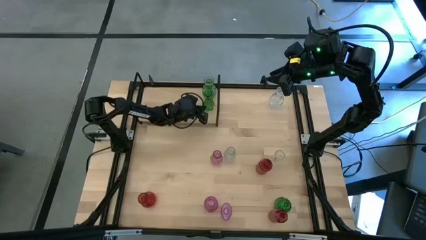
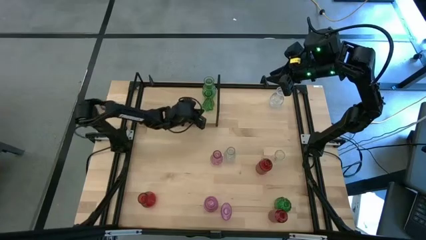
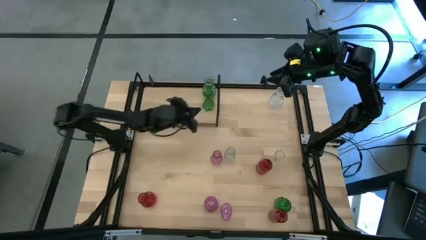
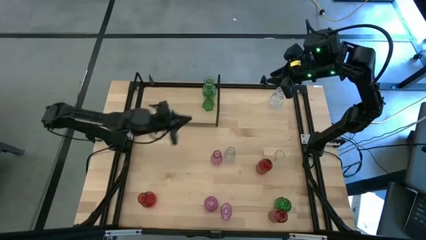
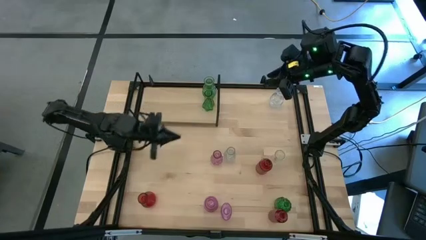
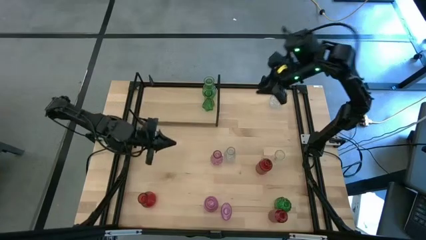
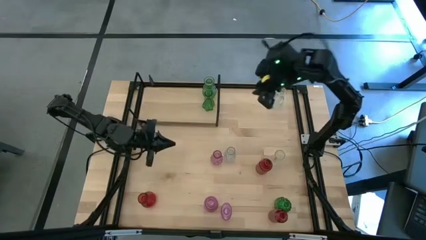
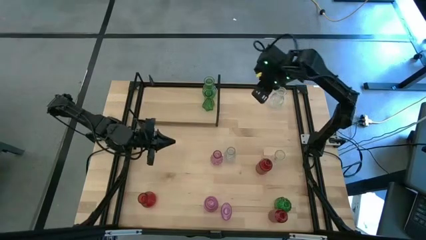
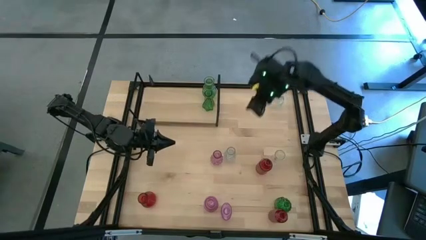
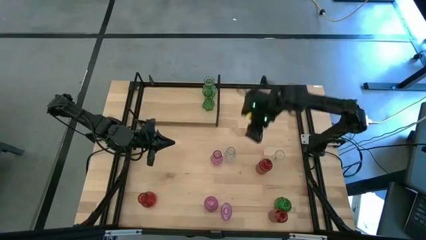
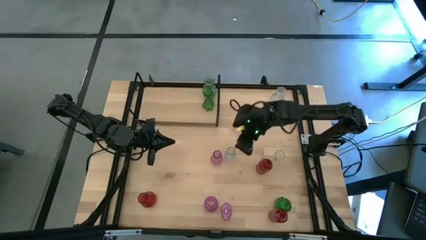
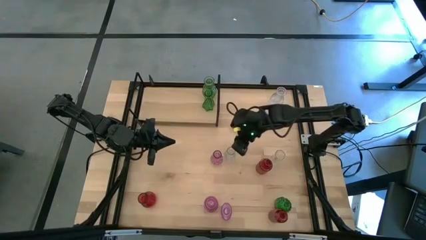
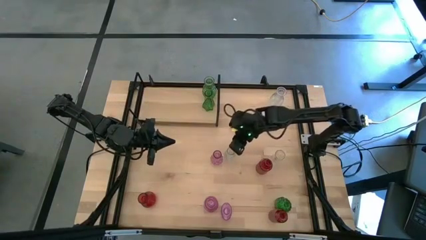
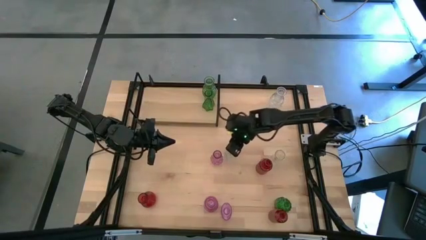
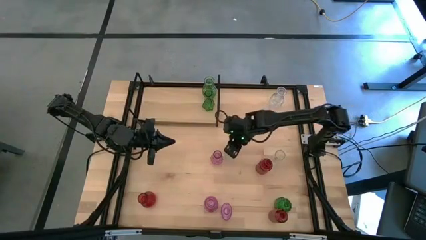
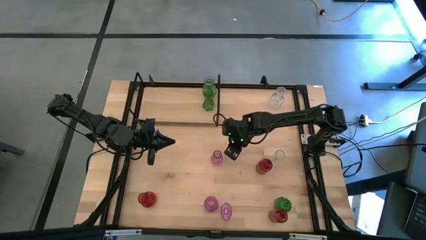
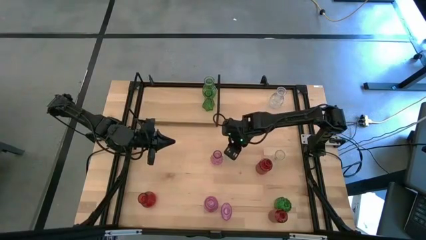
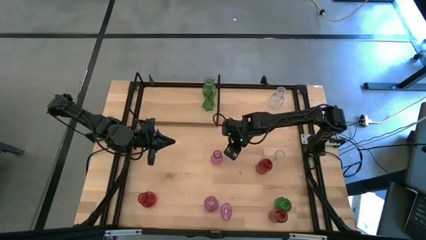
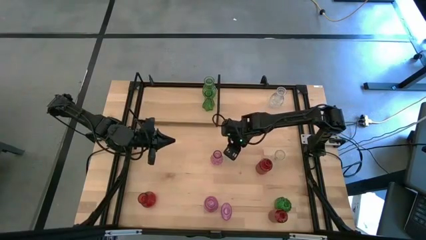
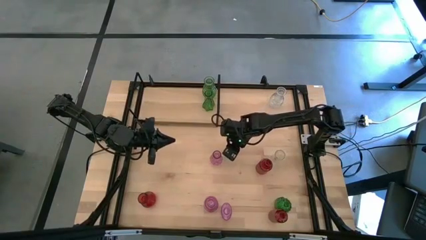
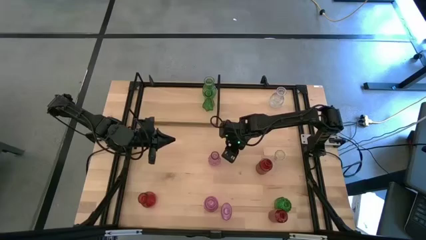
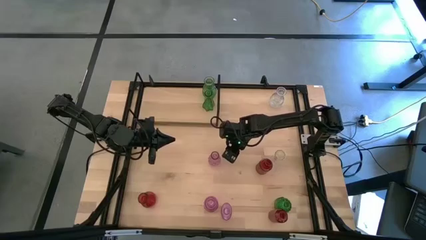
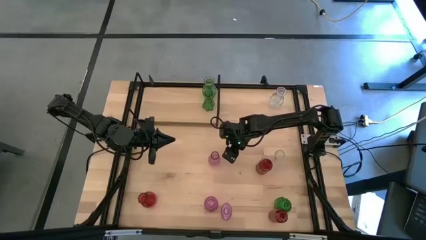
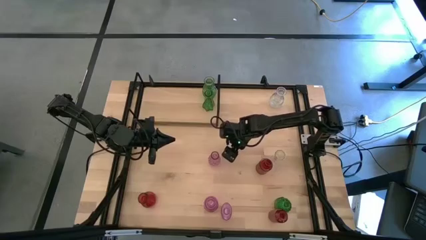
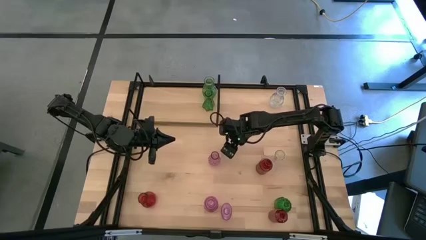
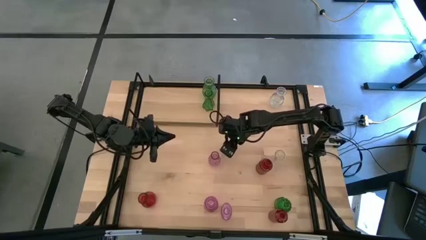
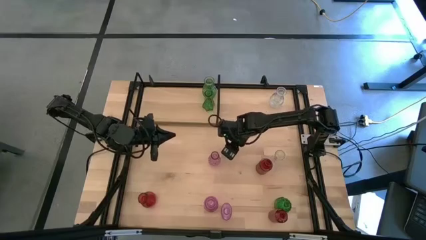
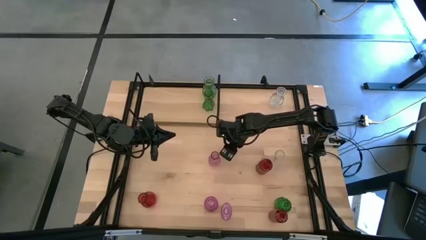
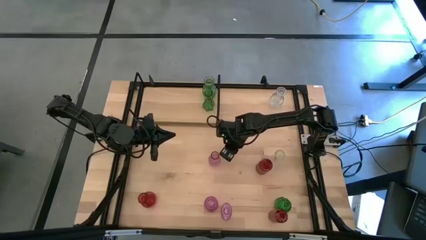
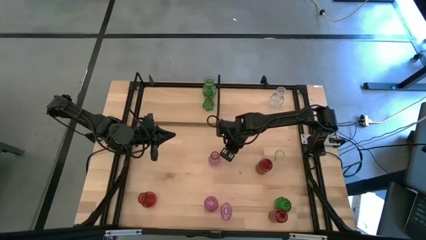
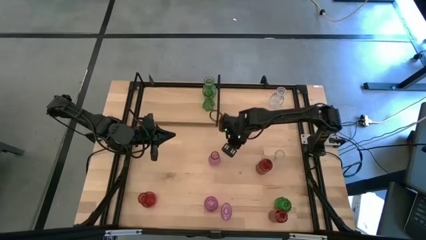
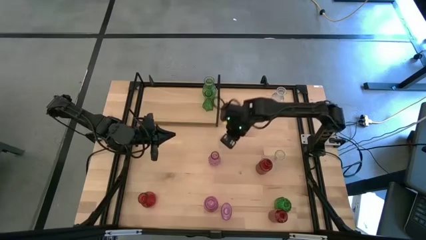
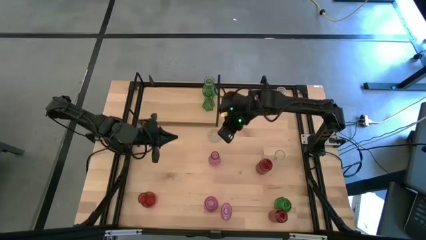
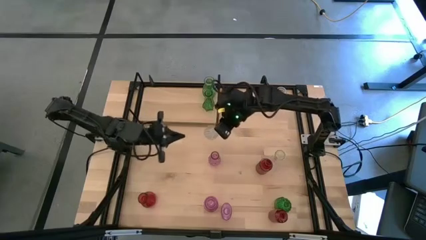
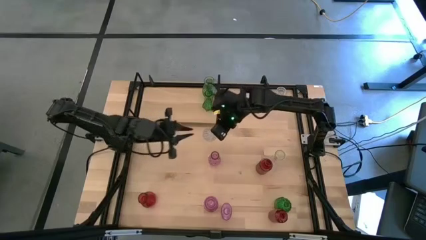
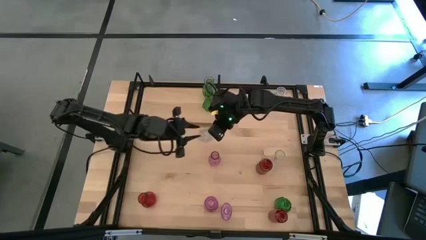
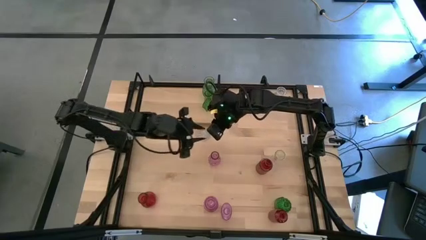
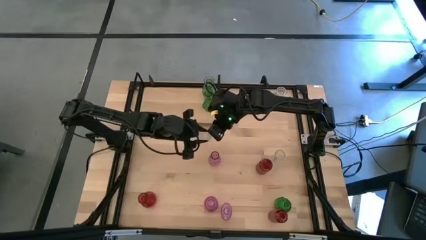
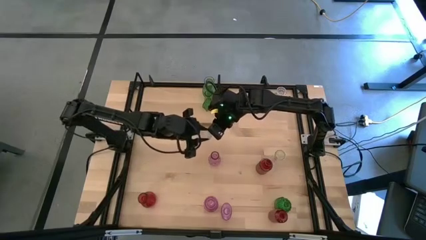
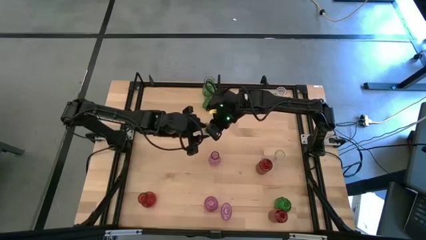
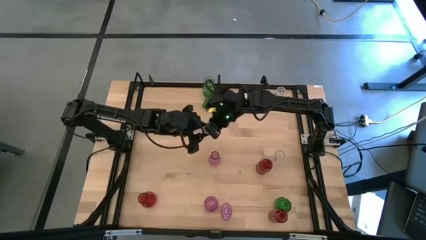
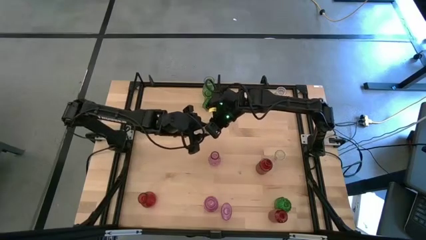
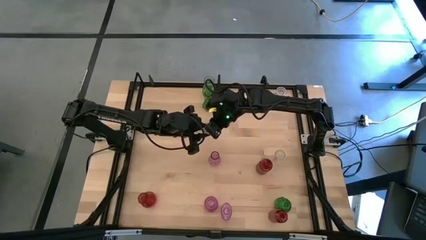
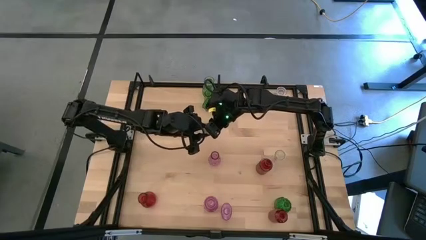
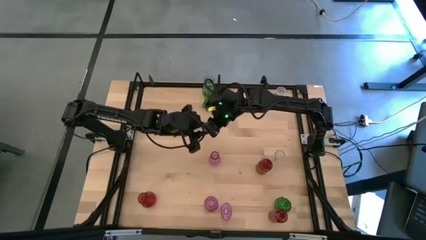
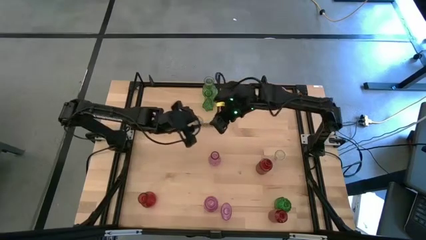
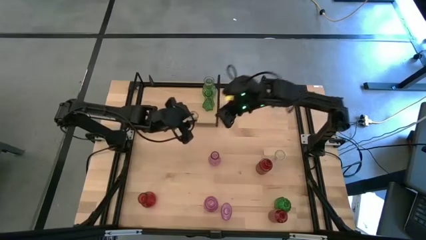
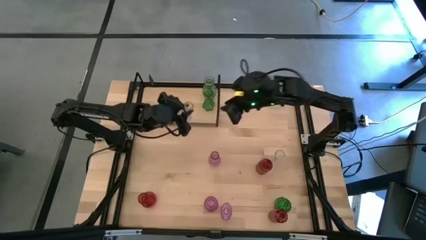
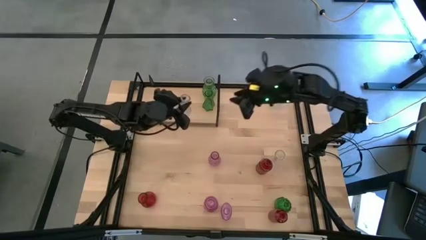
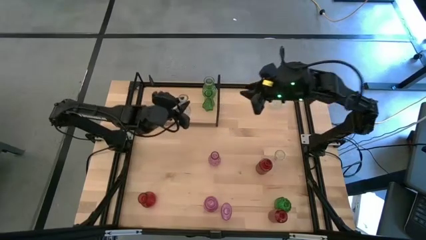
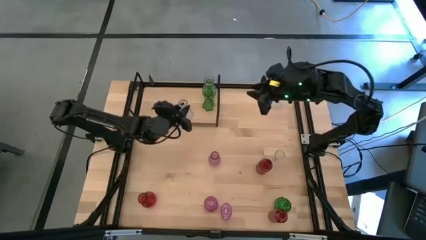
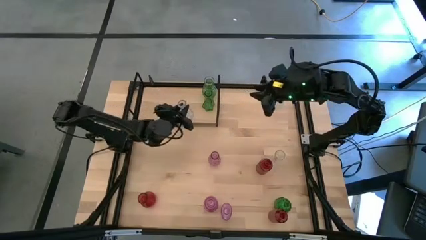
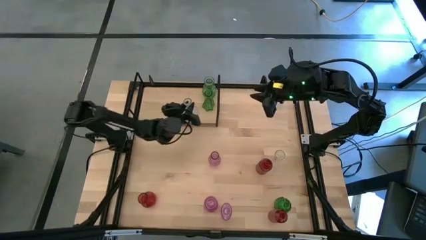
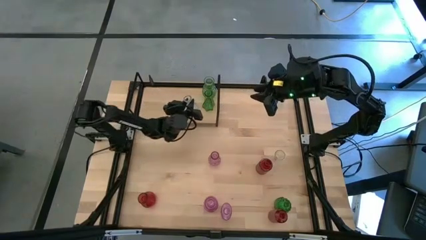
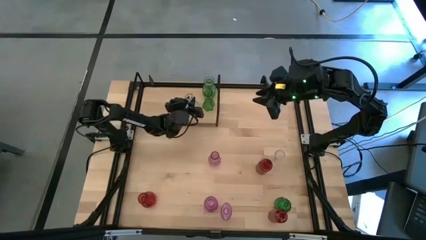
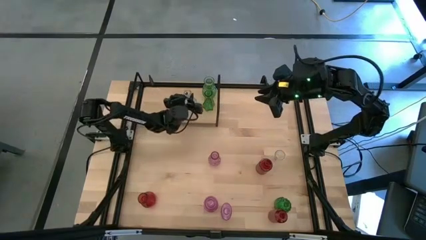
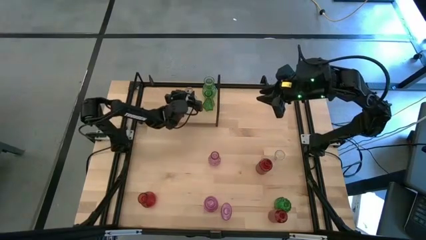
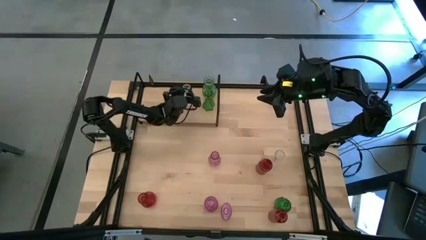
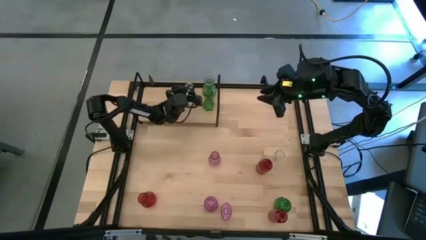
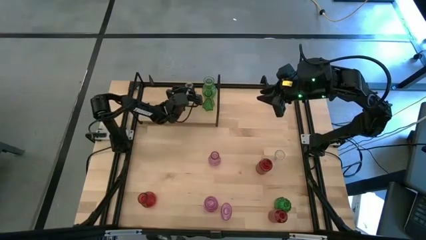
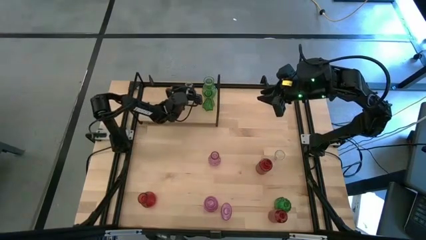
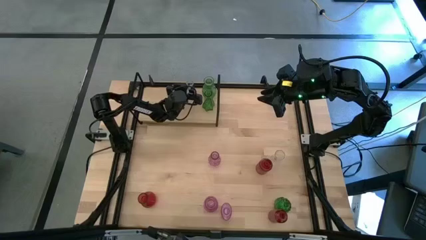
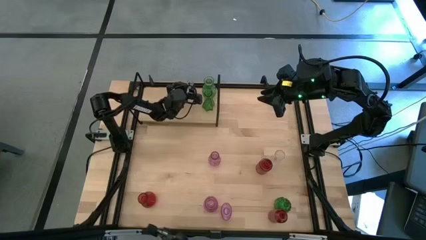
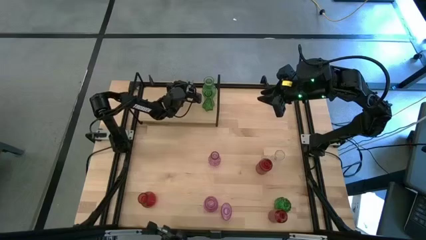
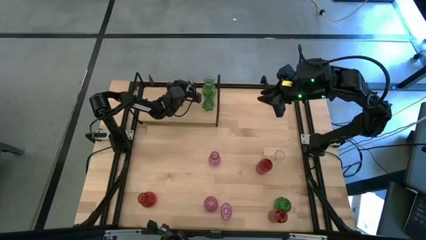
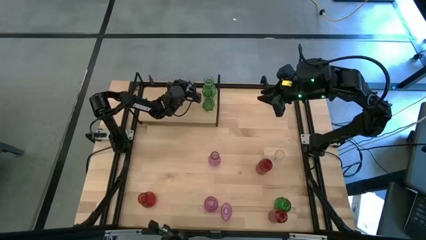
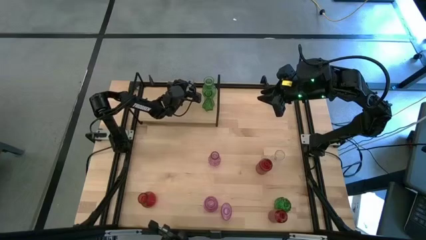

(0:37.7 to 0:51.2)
Task: sort vases onto shelf
Put the bottom left transparent vase on the shelf

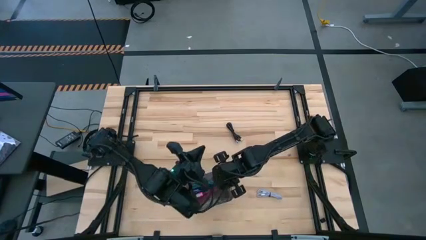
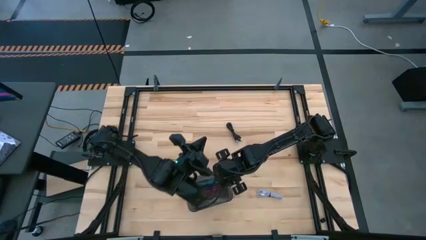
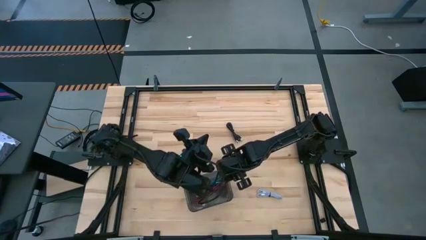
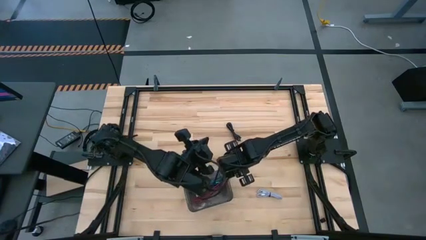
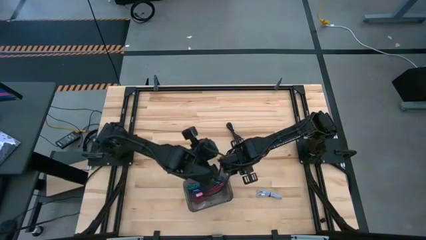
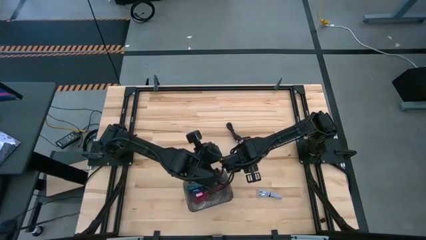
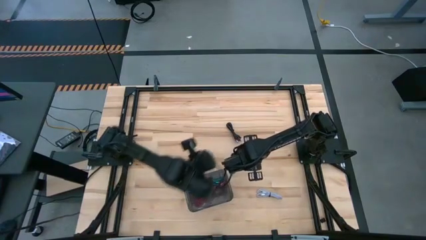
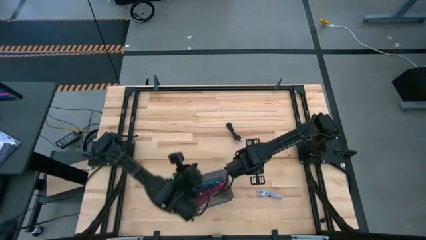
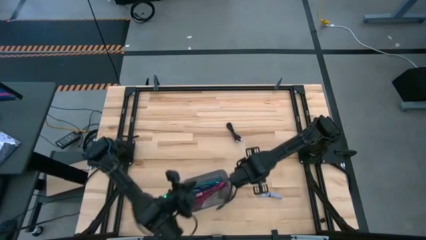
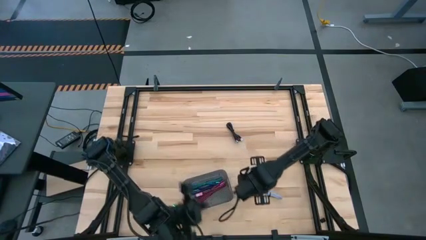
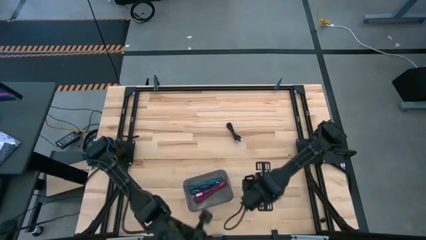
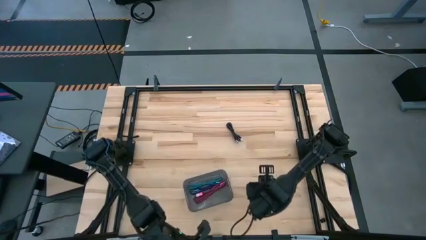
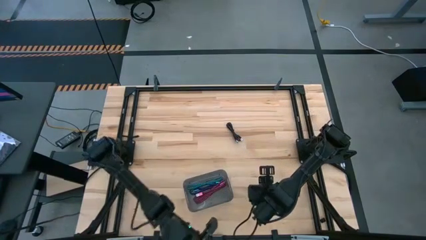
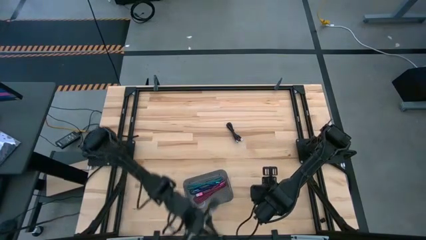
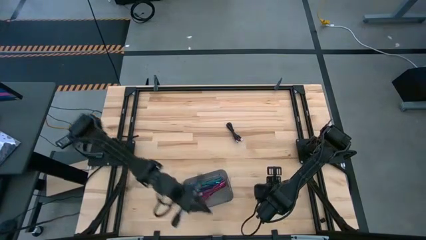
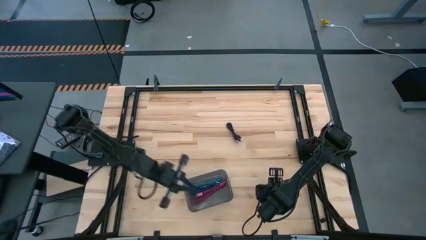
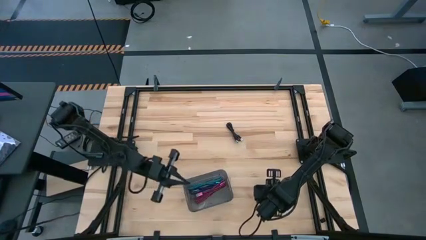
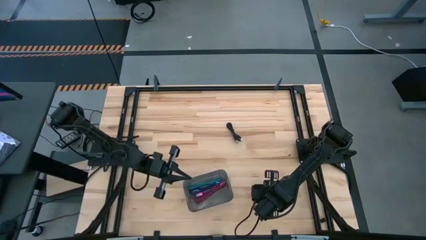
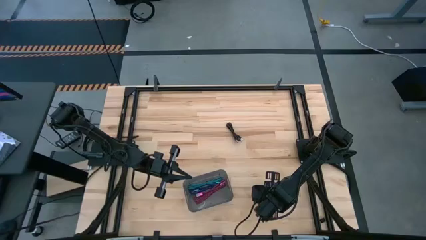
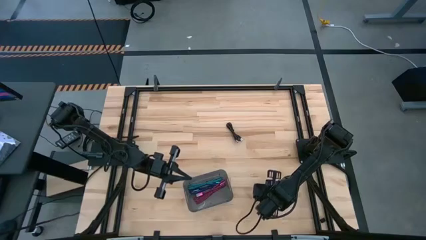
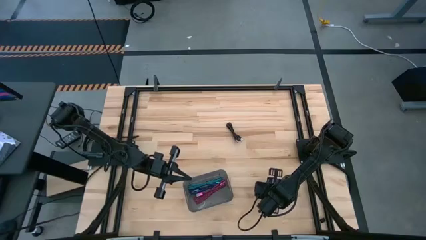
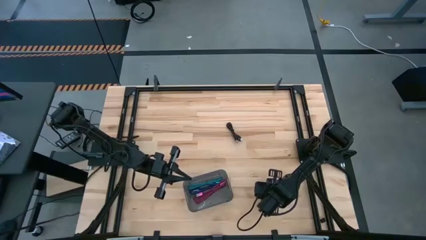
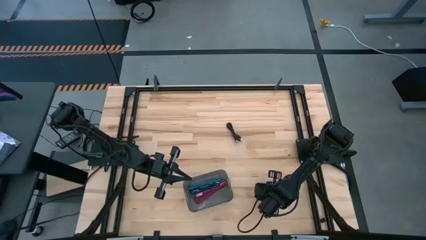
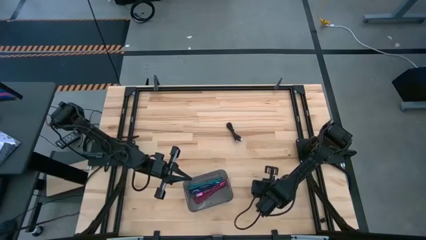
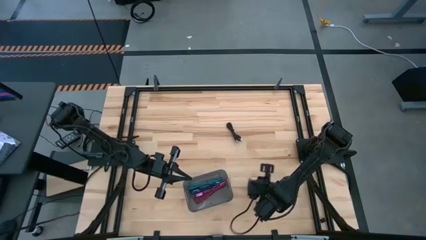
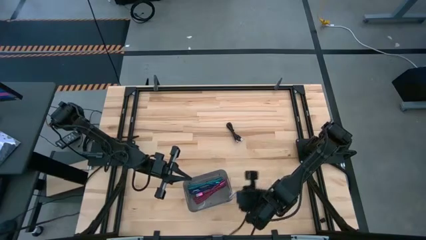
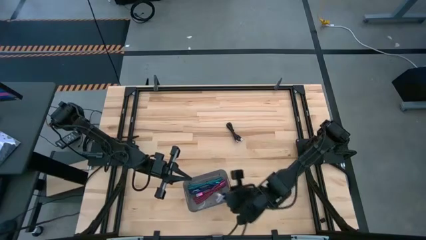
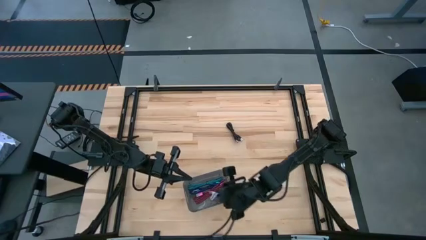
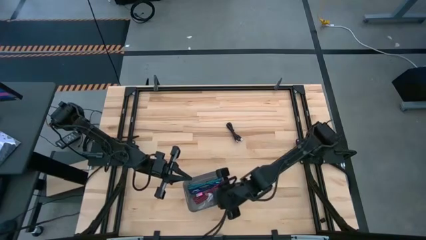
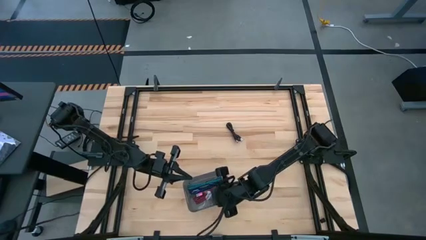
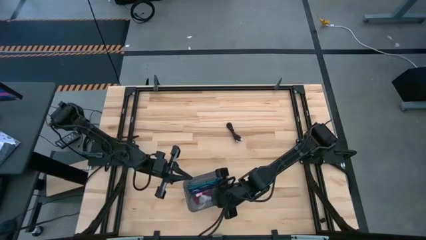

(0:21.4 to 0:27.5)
Task: Pick and place USB-C Cables
Put the white charger cable into the black bin
